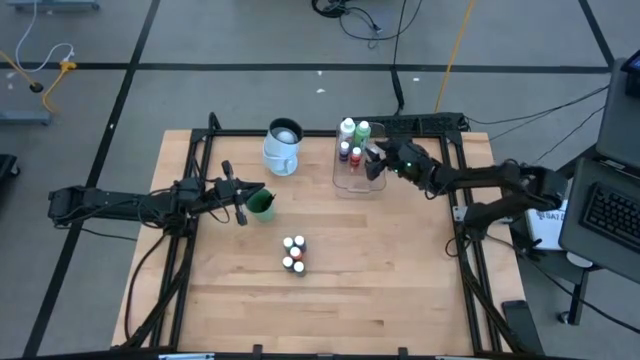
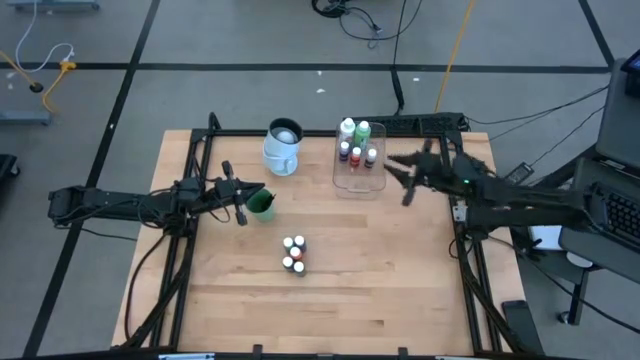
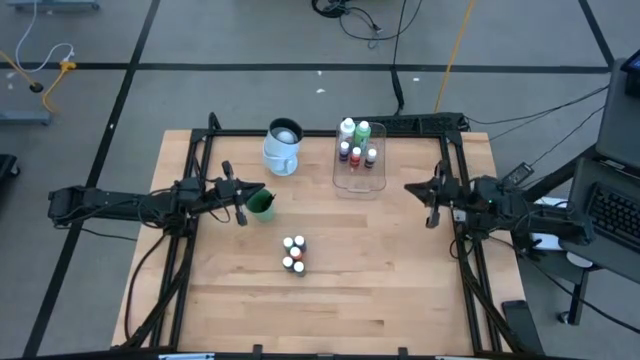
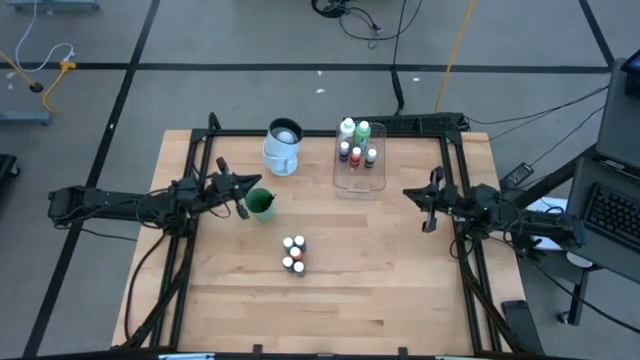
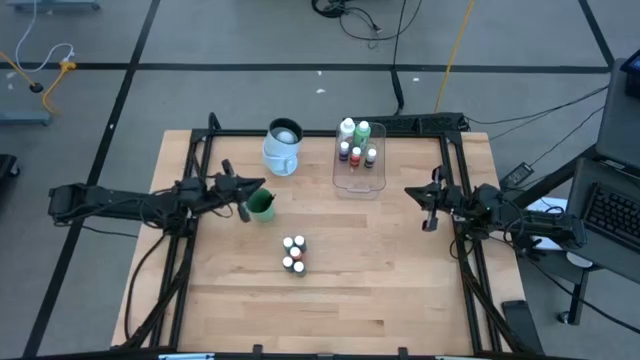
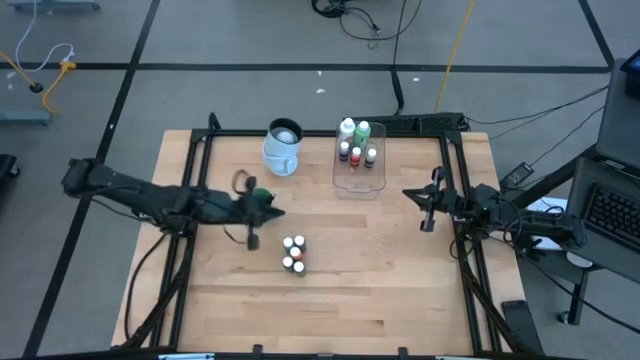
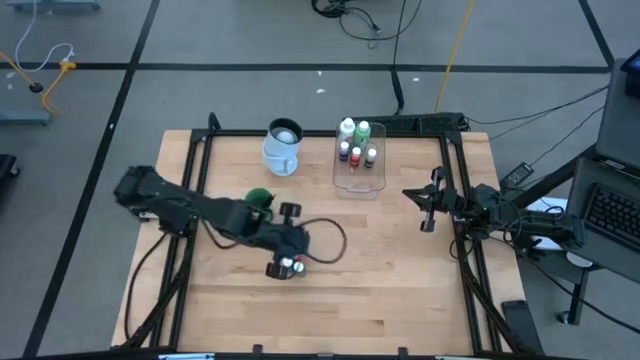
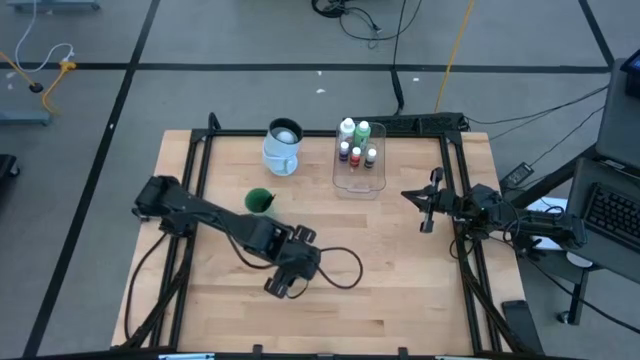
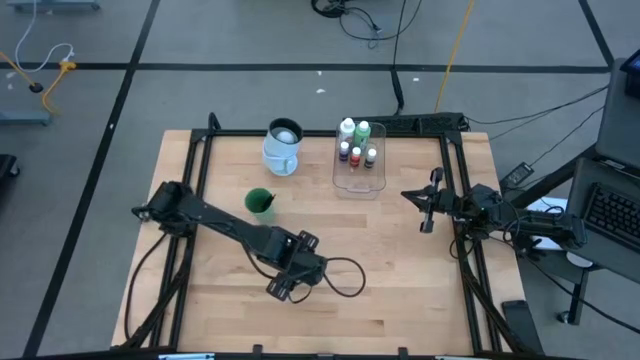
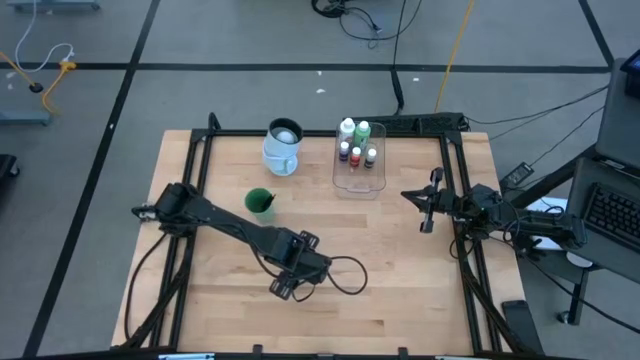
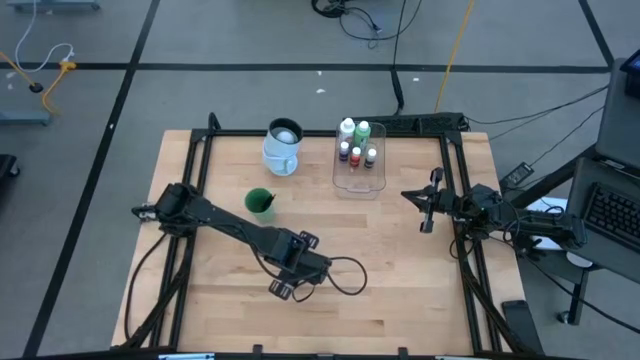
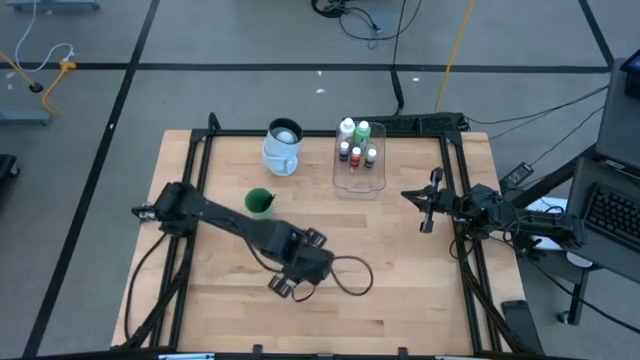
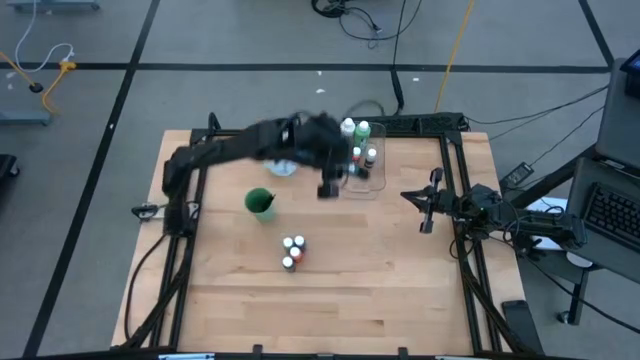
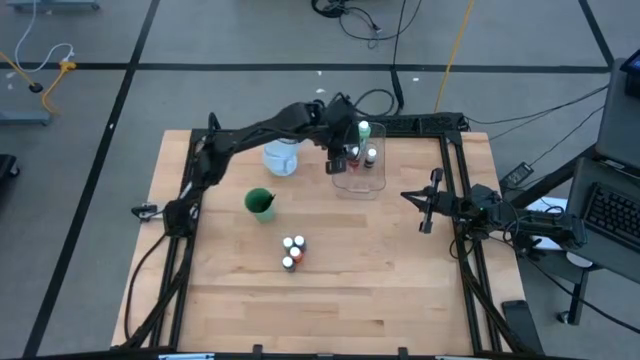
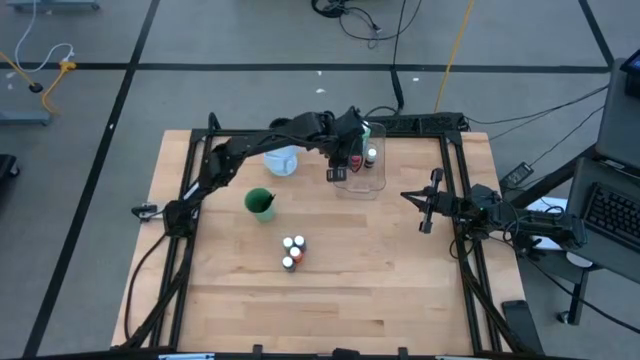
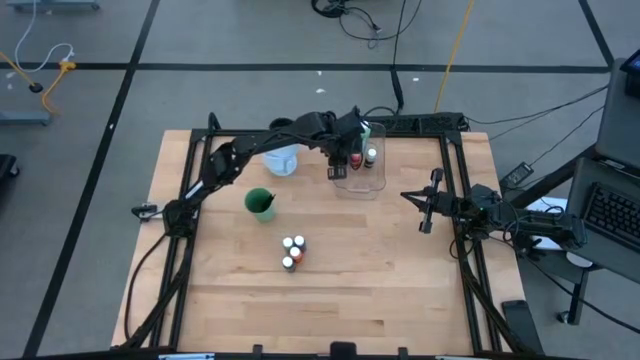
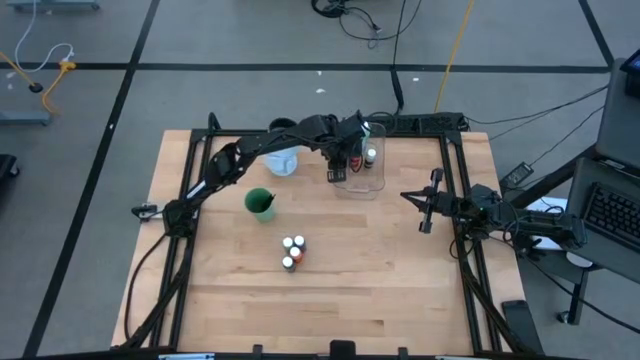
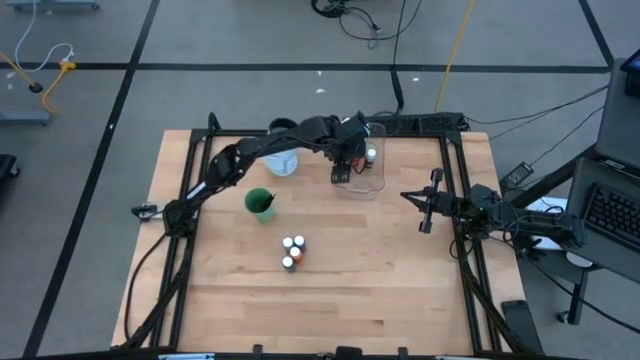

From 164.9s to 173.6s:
Task: Pick & Place Paint Supplies
Put the dark green paint bottle into the transparent bin

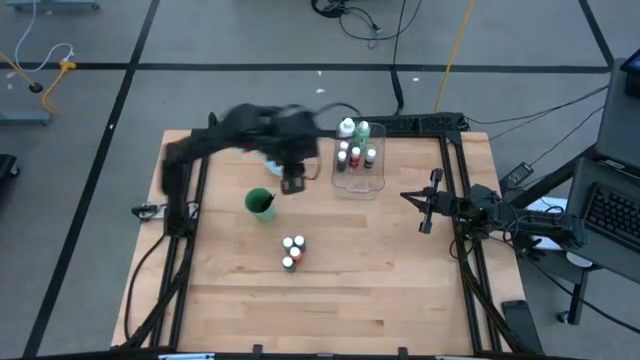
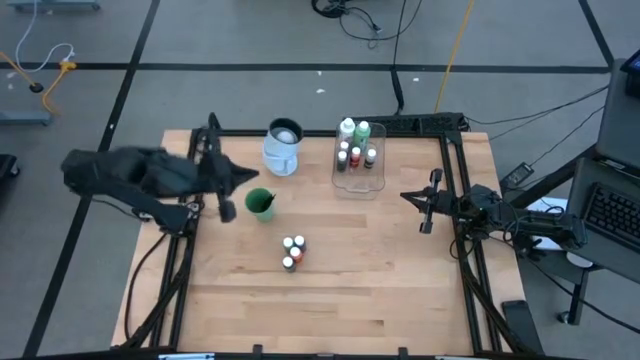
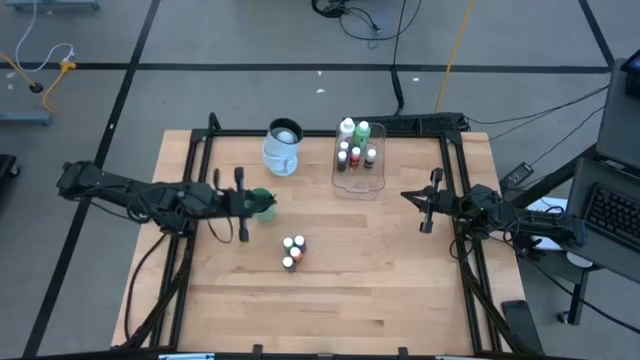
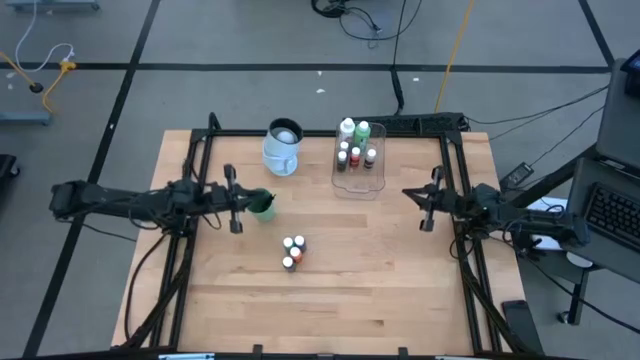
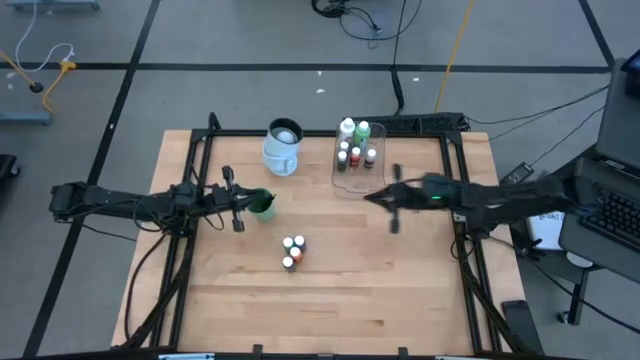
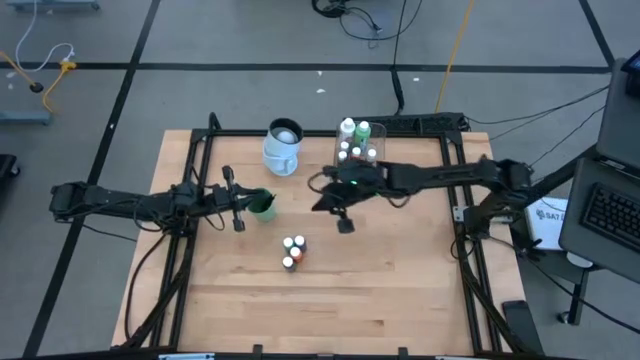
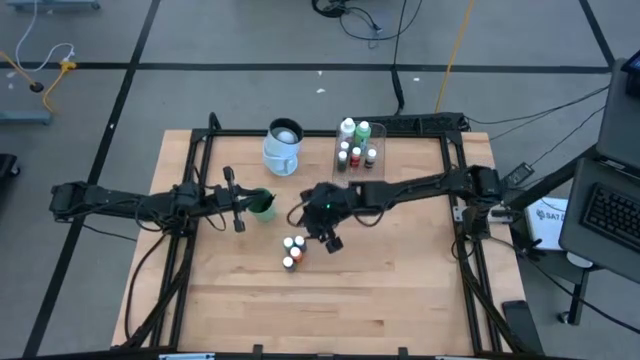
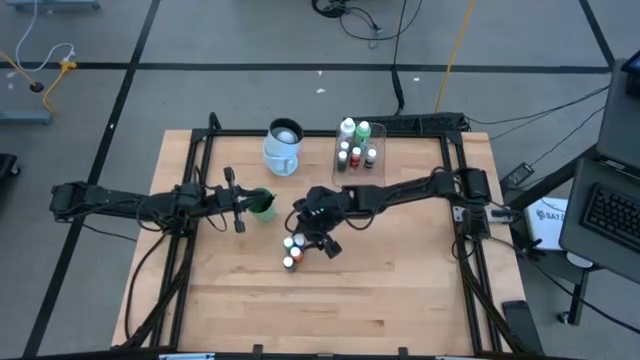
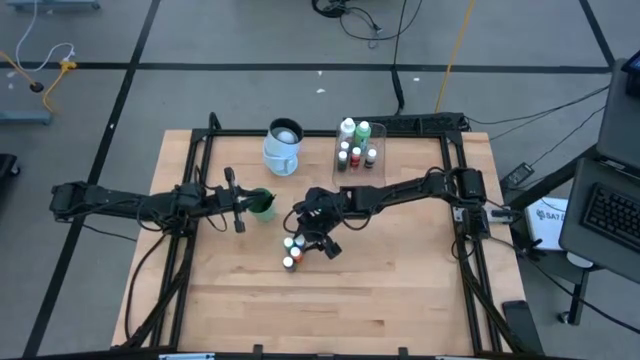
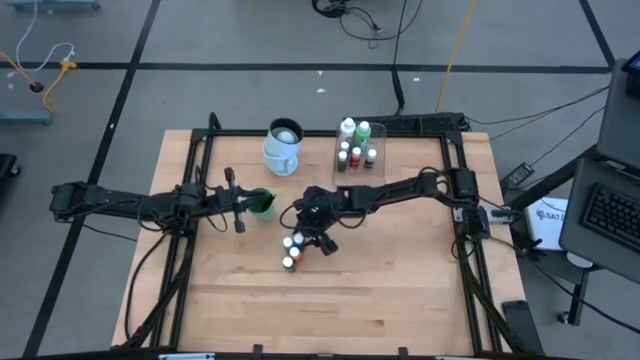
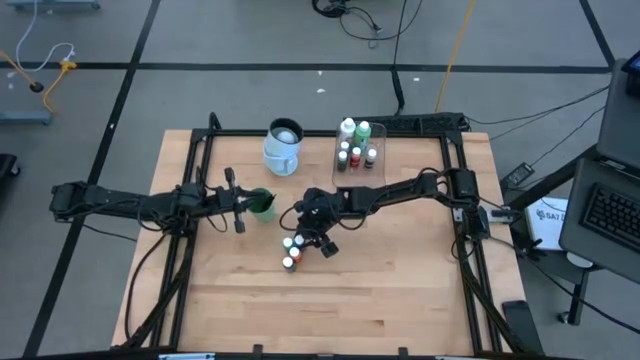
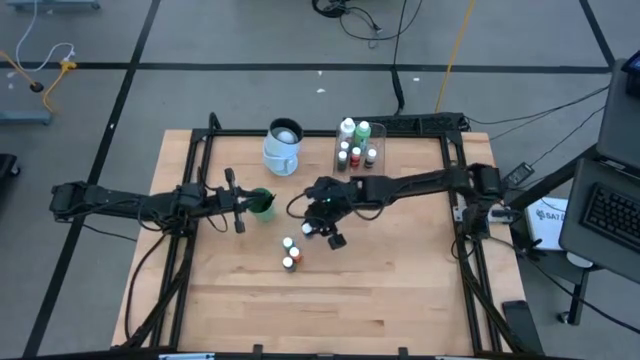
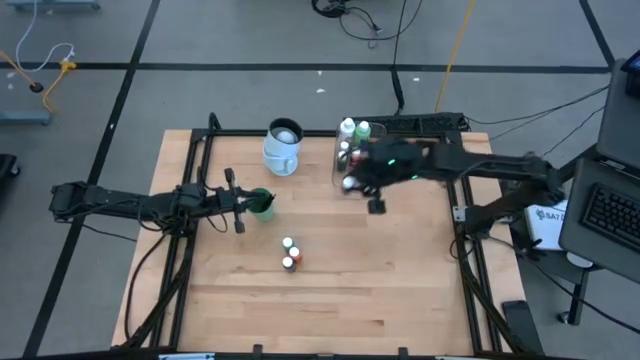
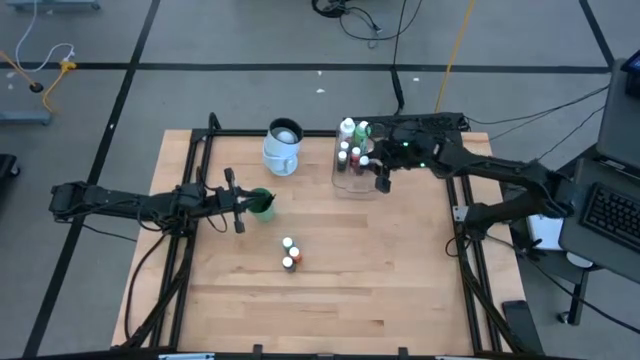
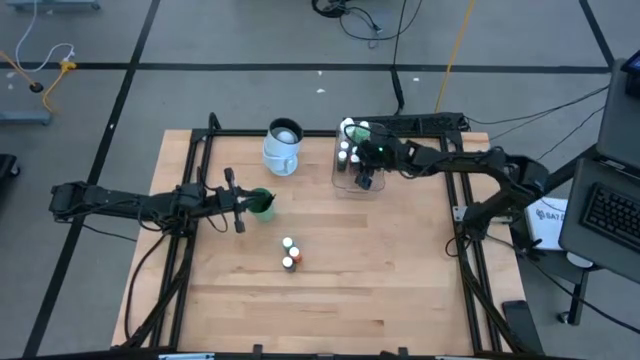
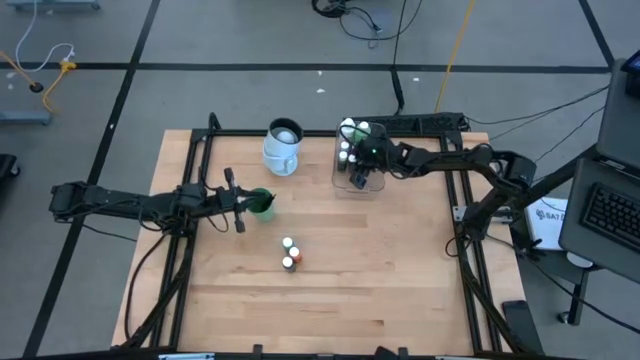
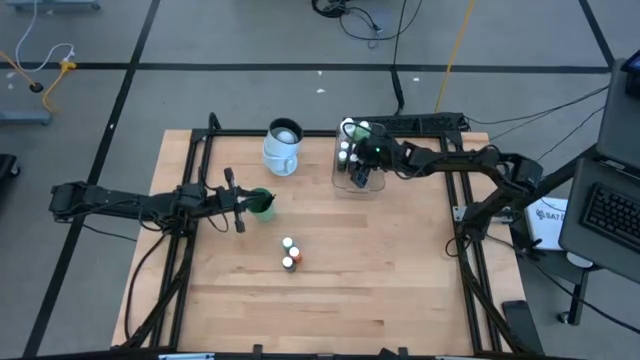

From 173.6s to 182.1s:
Put the dark blue paint bottle into the transparent bin

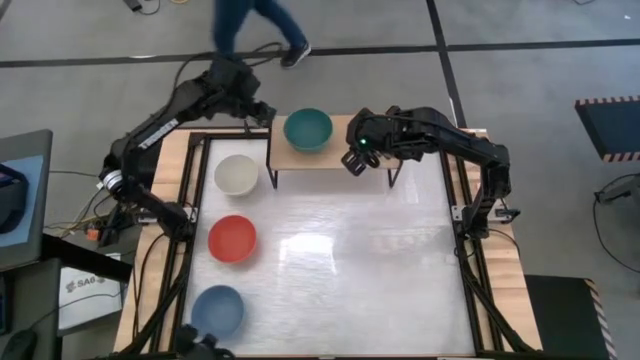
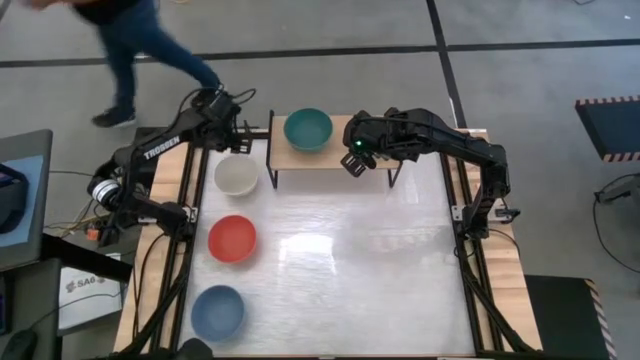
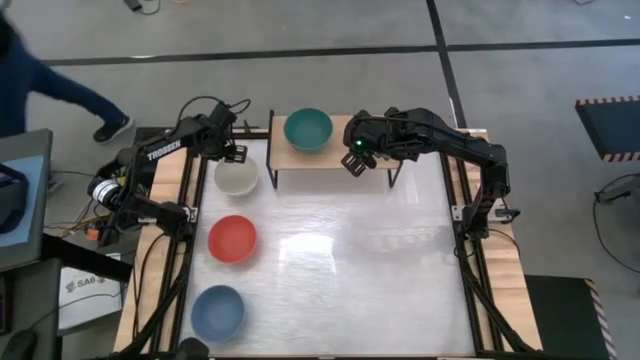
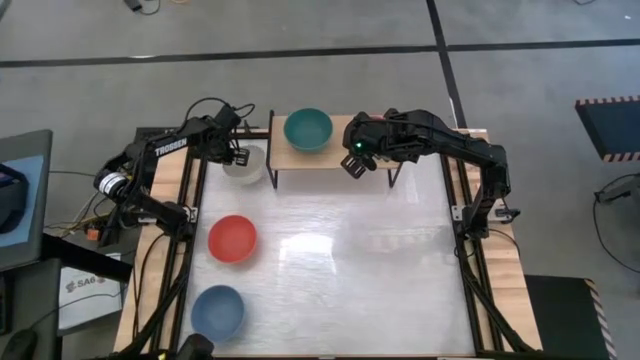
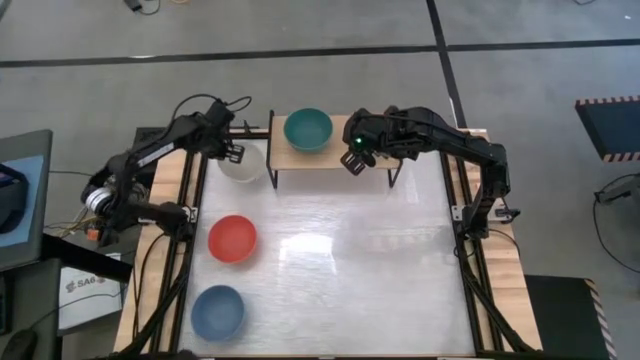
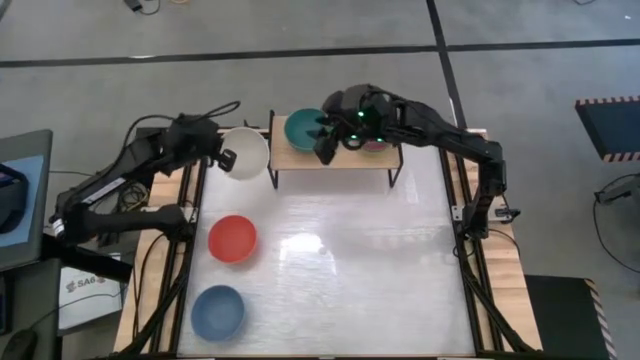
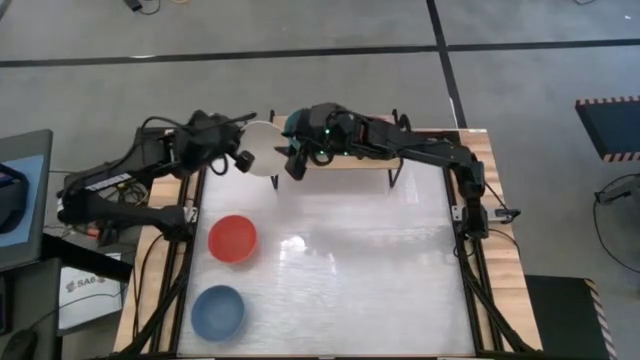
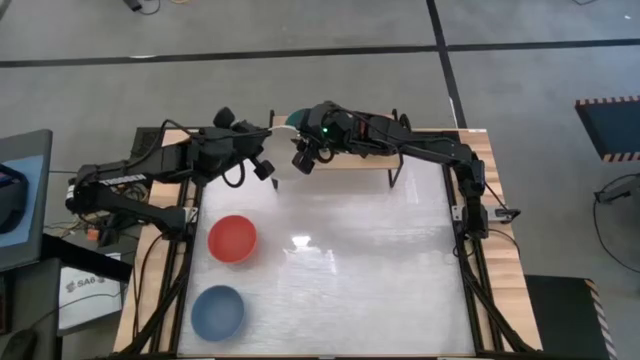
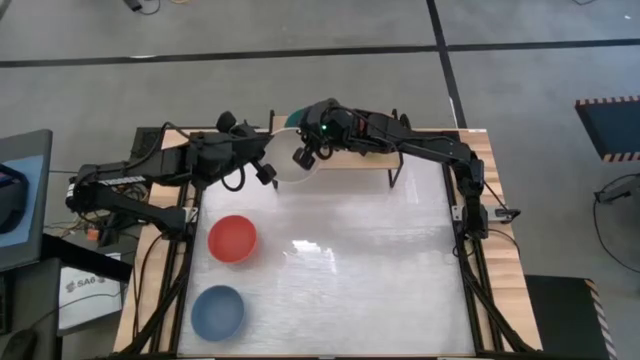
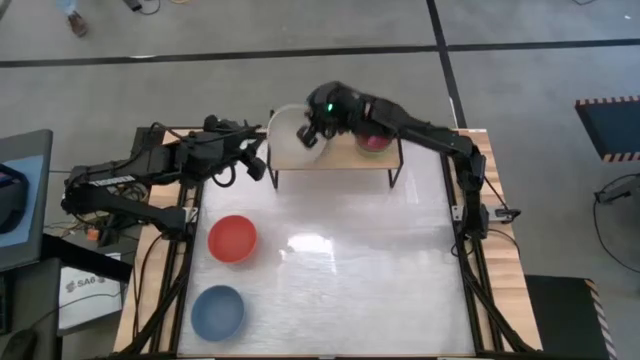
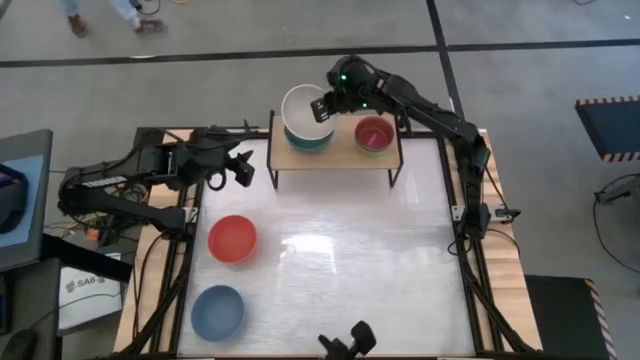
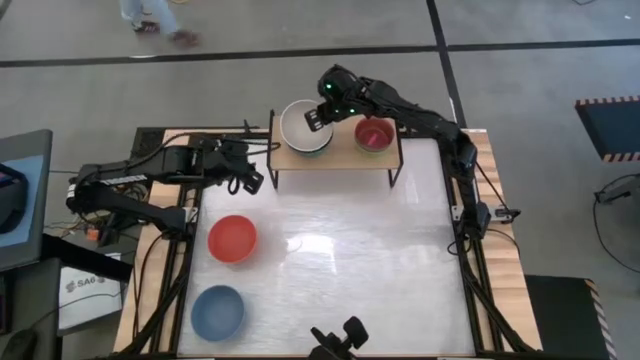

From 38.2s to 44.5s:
Task: Place and stack bowls onto a shelf
Stack the white bowl on top of the dark green bowl on the shelf
